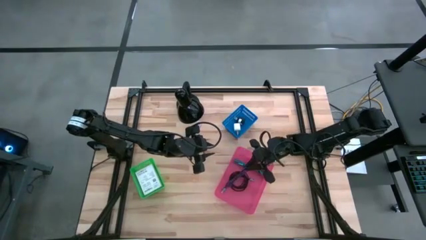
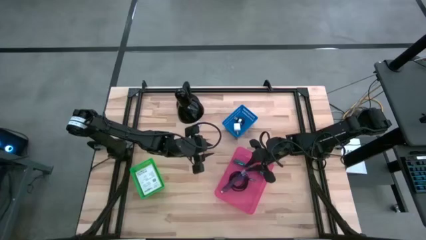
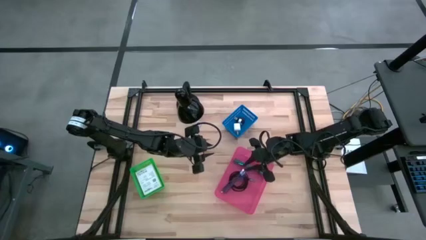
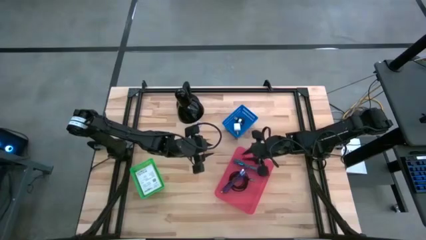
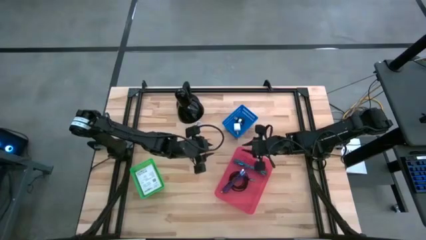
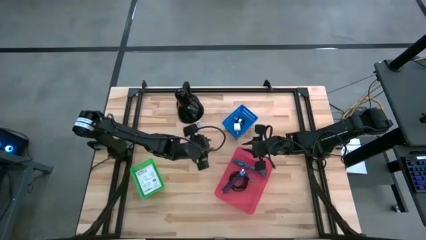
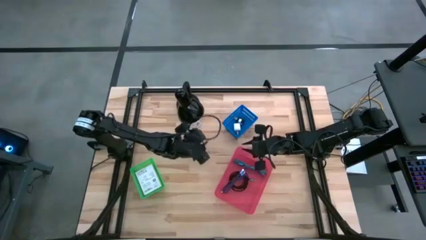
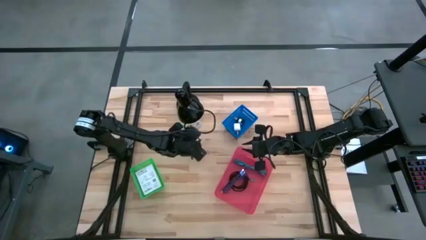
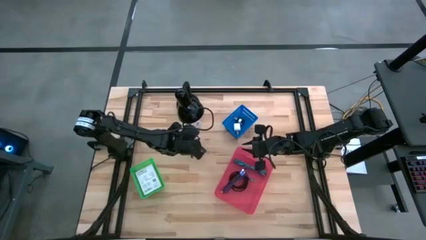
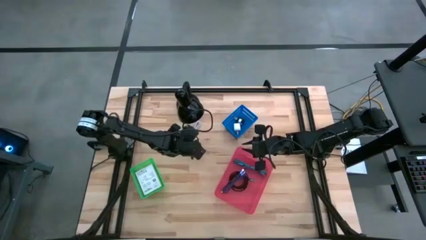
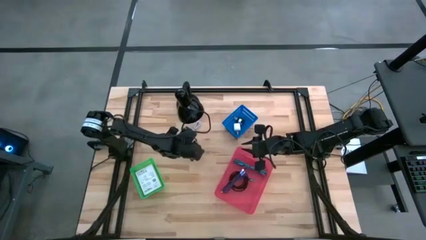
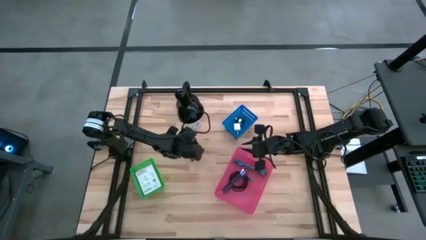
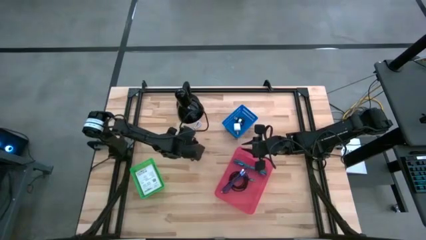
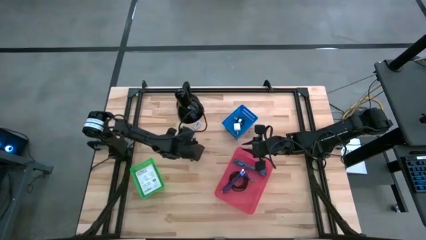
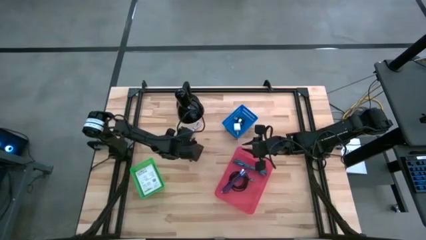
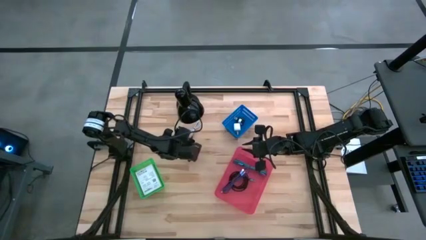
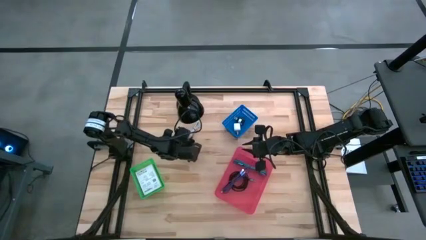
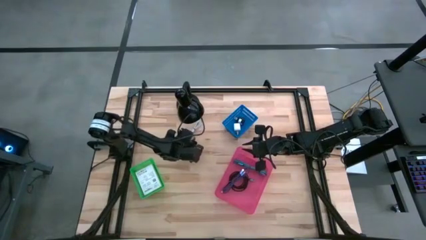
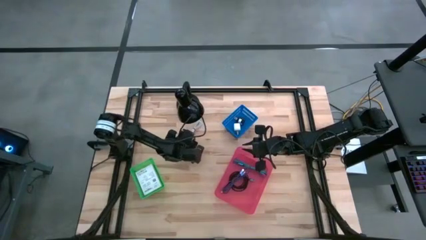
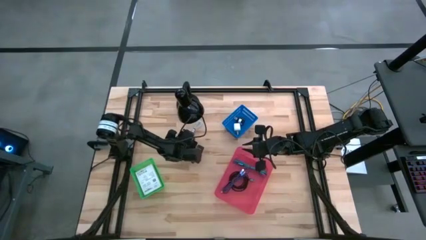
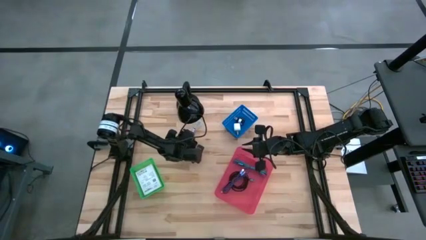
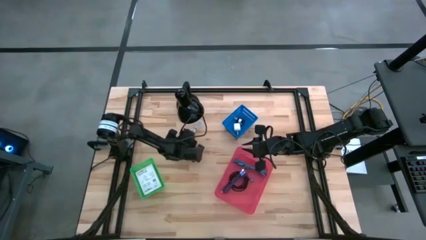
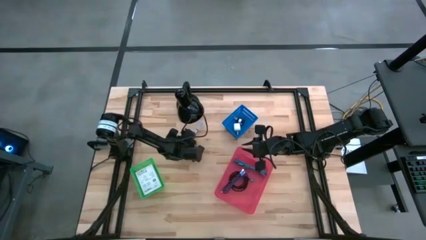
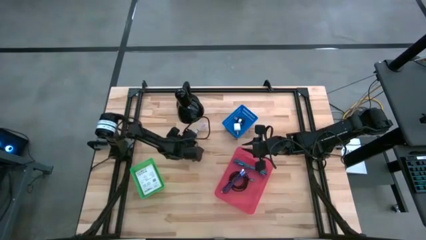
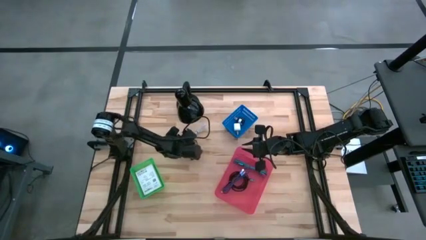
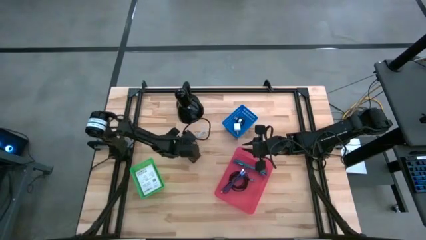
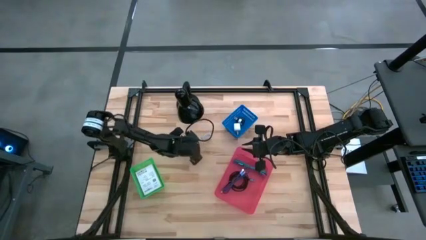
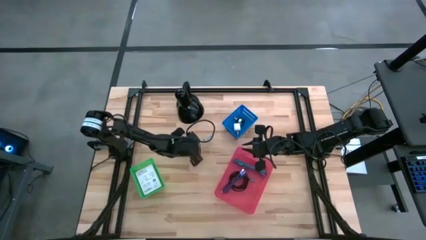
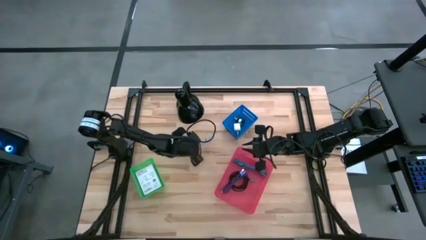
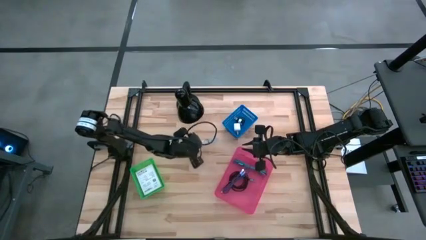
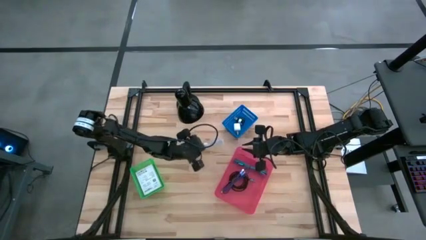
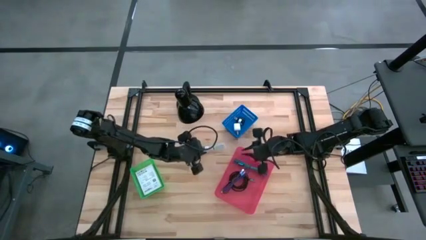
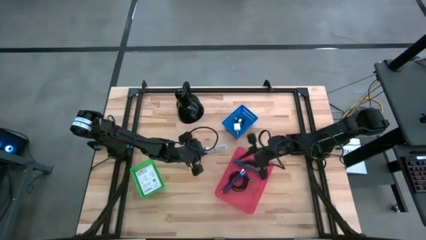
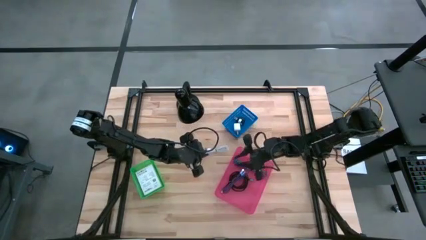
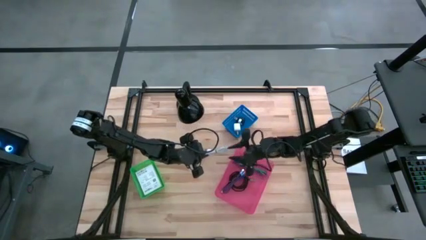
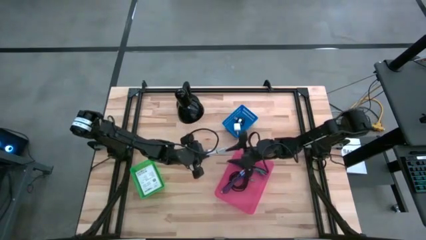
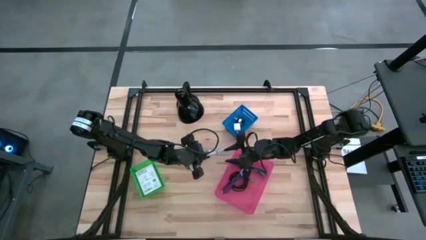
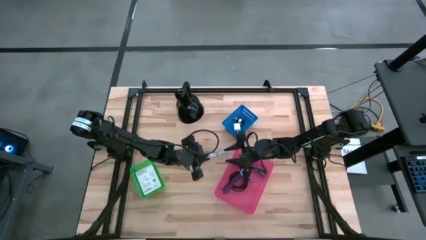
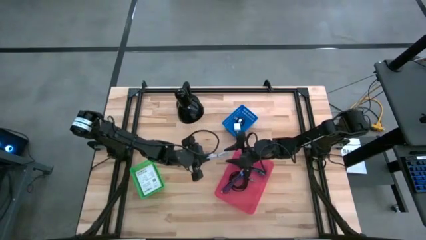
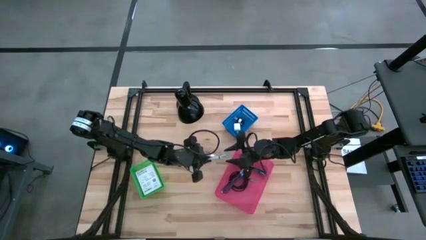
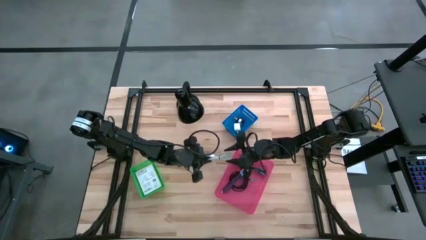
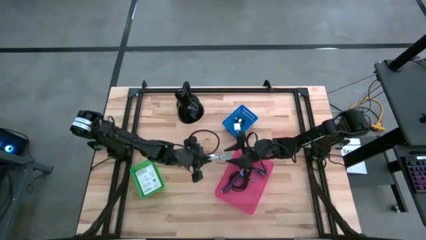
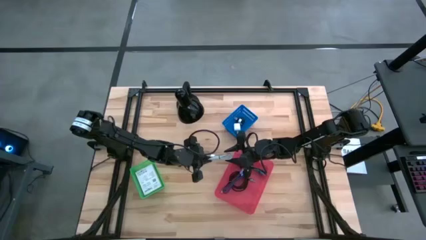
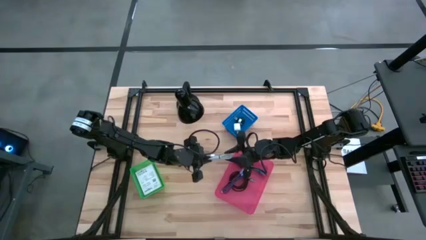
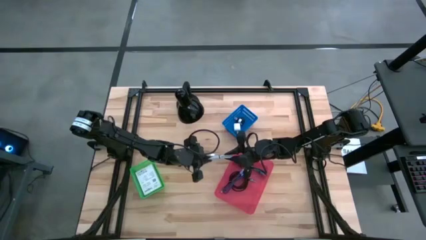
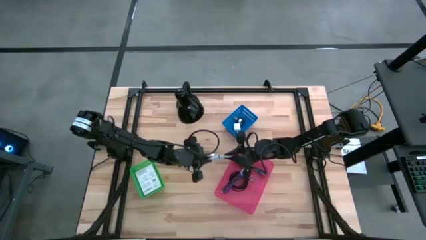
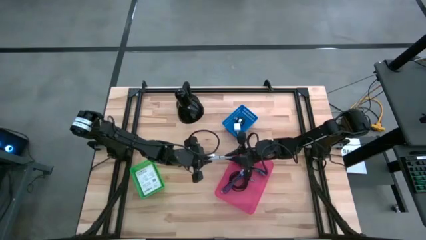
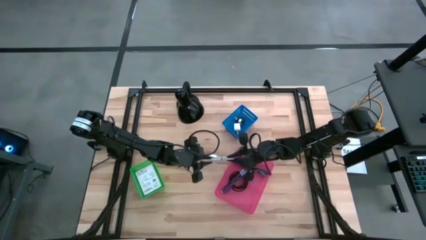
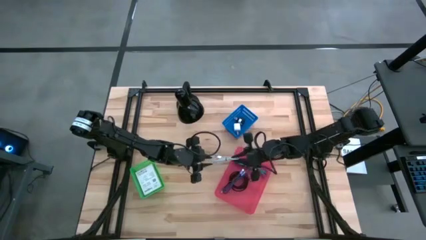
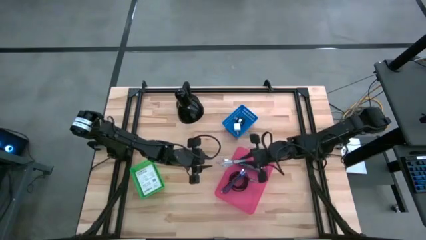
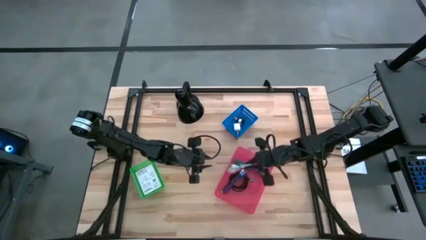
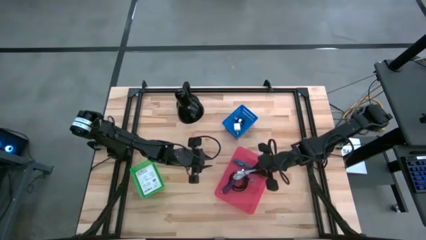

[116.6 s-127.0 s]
Task: Pick and place items into bin
Put the white charger cable into the pink bin
